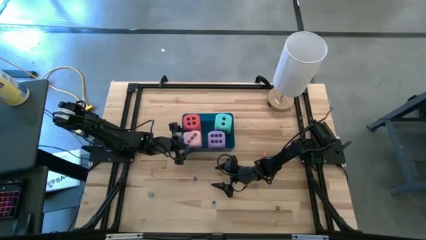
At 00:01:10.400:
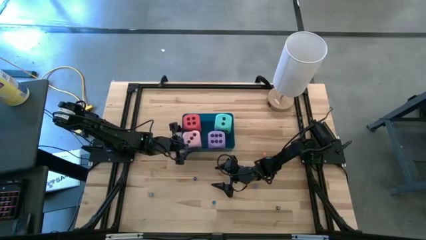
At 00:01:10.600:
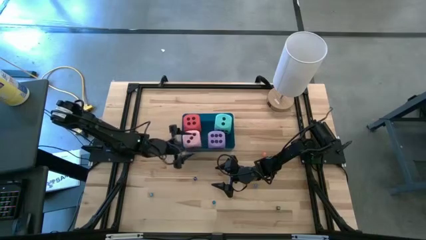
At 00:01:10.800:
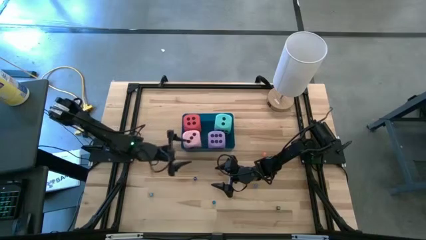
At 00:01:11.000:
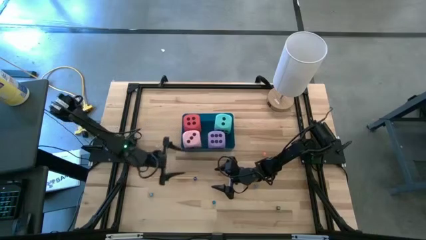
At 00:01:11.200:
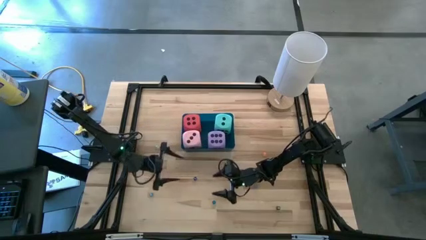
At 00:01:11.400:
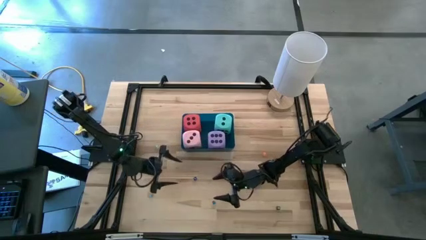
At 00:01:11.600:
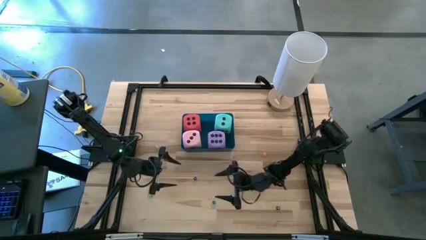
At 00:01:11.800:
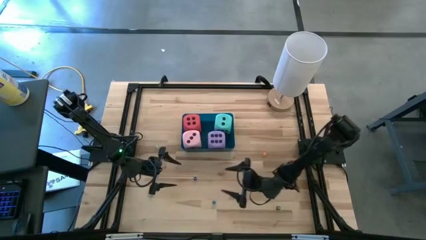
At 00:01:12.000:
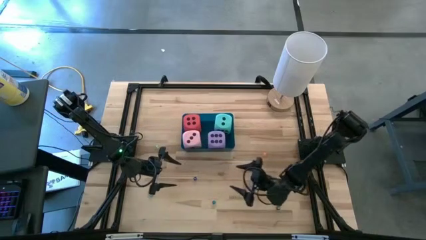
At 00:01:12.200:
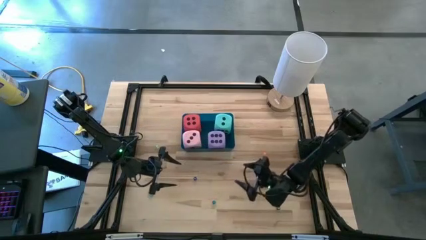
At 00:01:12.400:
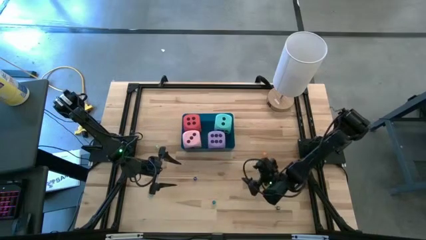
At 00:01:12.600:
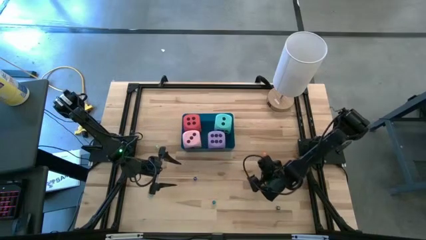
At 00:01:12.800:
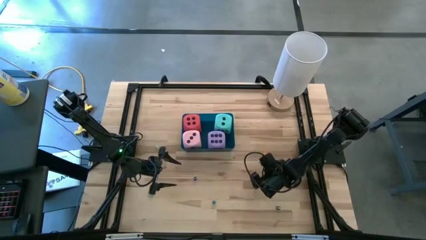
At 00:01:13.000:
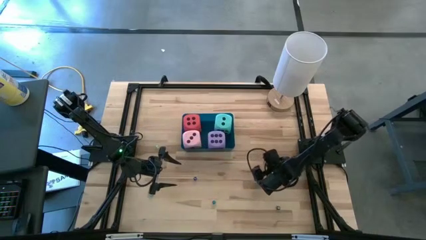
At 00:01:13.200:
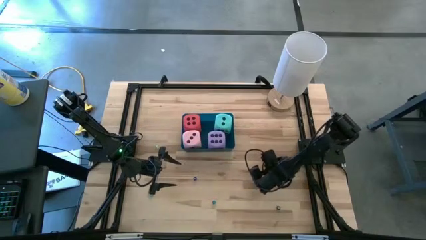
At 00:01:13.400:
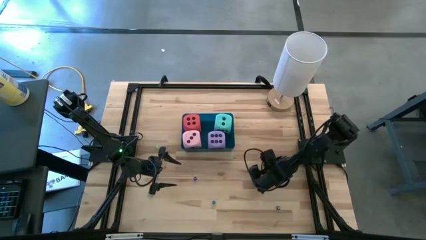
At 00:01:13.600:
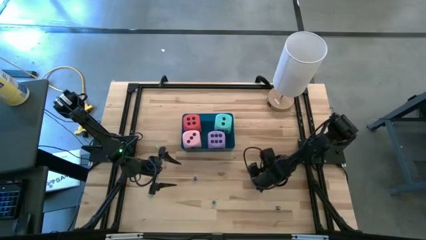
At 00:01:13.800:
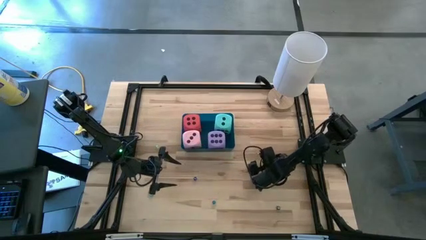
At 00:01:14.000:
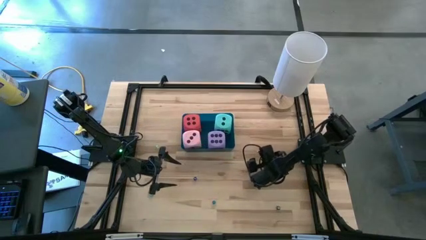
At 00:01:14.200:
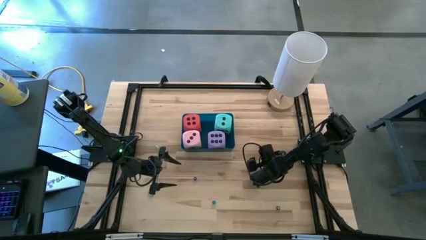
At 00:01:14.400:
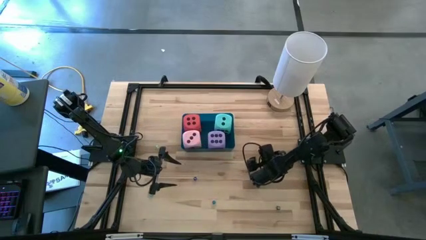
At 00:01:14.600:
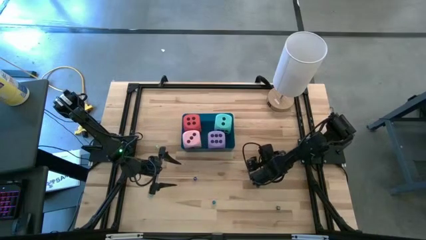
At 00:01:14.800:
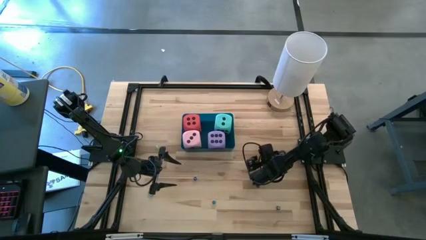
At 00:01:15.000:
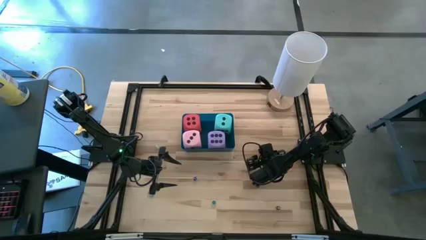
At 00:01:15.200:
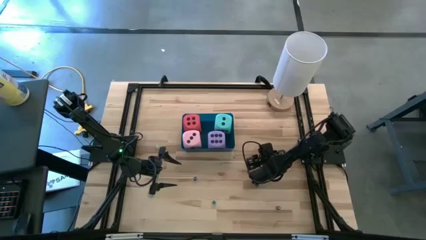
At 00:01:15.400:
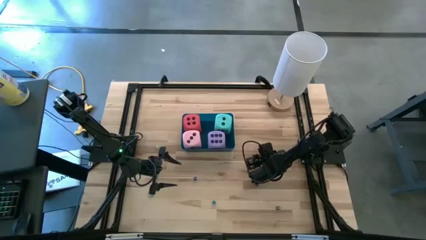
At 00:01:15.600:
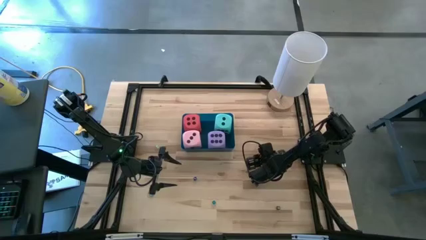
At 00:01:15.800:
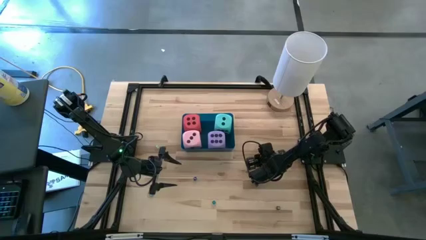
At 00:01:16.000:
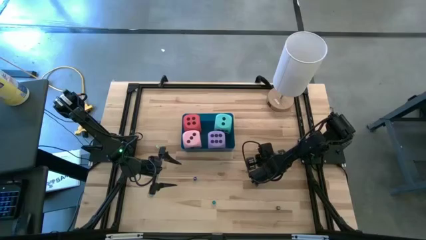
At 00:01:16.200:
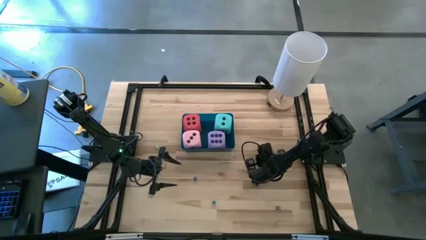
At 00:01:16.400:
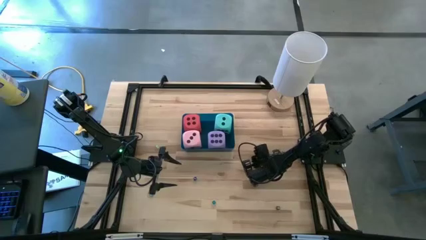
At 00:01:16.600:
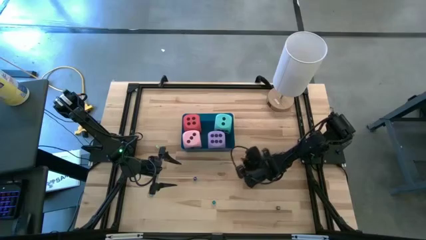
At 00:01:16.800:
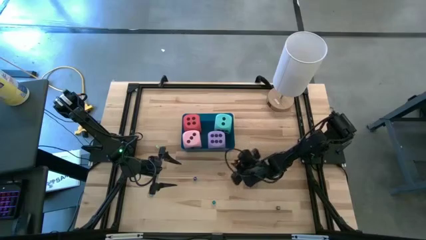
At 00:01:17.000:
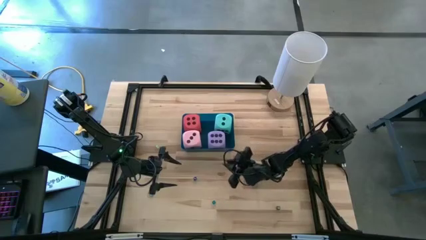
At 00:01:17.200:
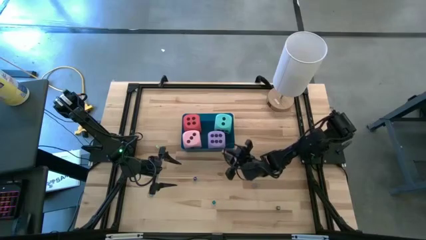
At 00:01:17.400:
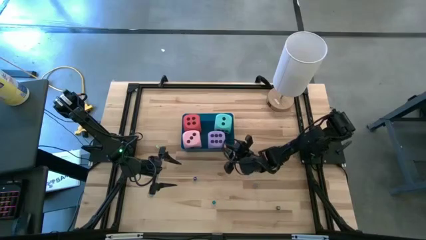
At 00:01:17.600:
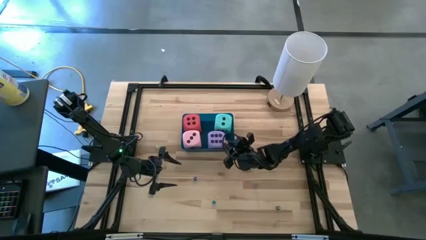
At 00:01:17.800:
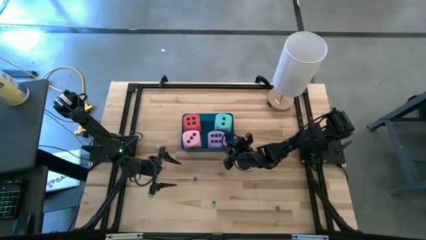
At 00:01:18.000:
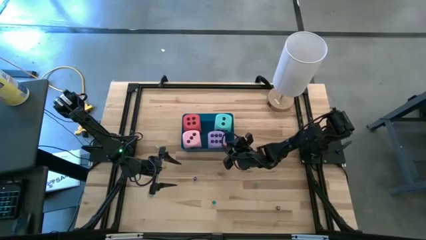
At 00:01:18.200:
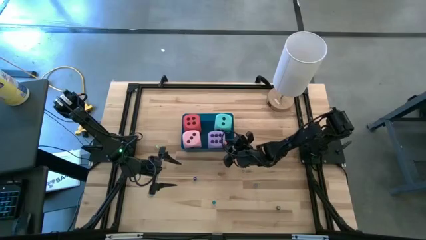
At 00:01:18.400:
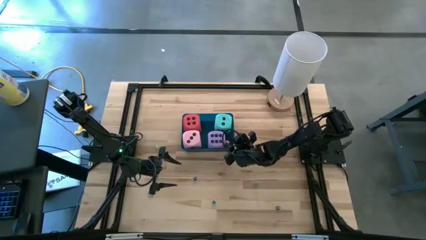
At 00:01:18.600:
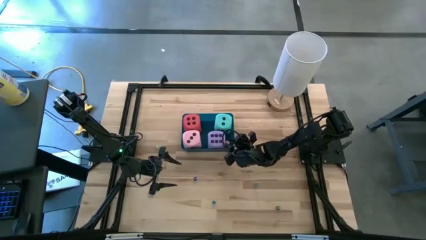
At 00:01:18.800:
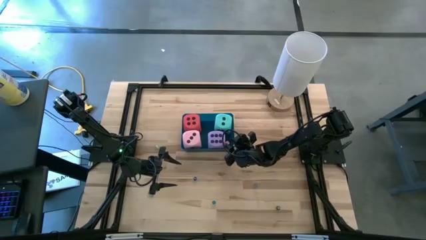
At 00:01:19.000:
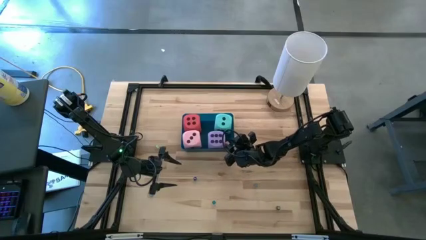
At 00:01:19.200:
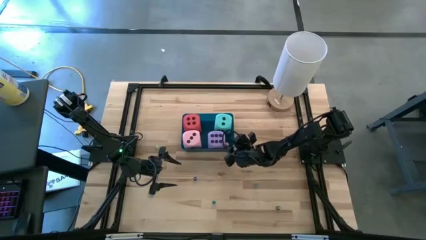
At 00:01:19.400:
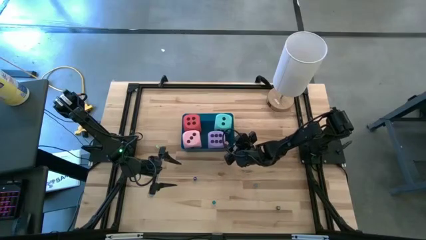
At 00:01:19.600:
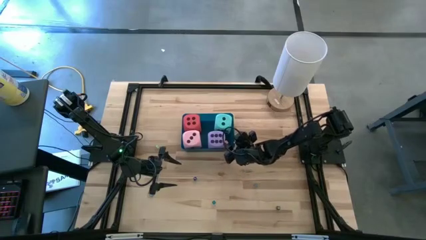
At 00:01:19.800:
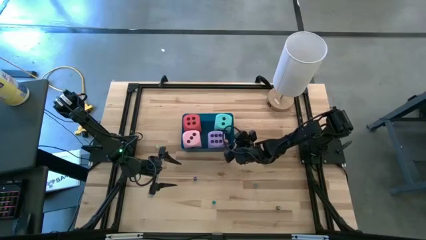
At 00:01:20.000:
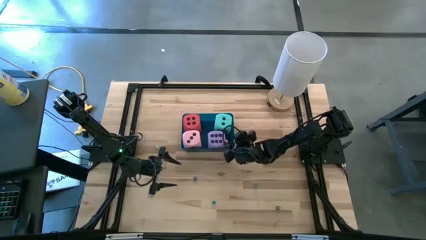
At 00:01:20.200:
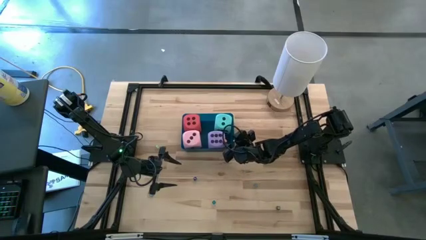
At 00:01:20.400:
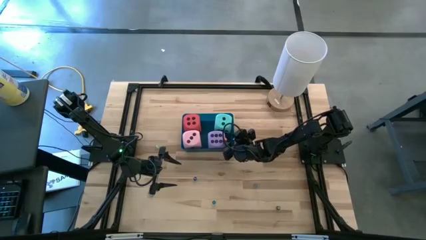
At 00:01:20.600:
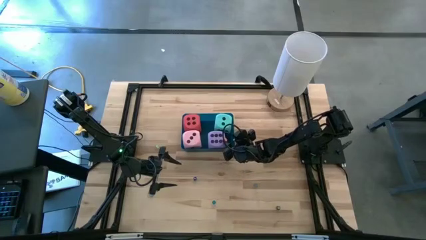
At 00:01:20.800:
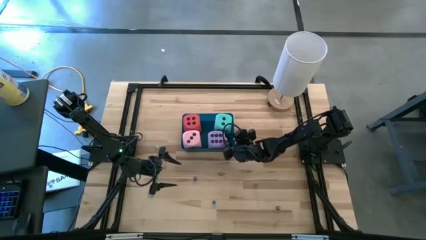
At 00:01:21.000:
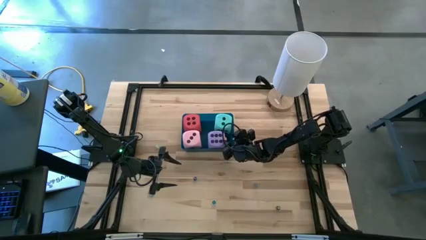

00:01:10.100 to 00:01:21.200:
Task: Pick & Place Dice
Put the orange die into the blue bin
